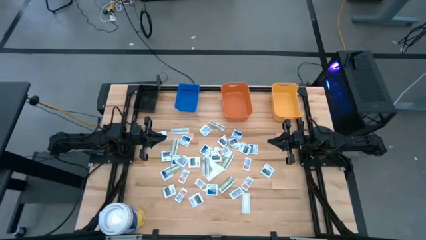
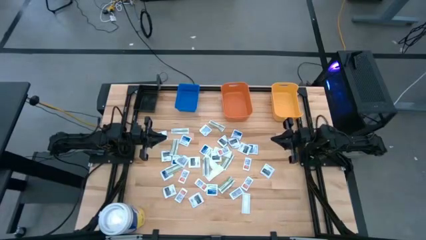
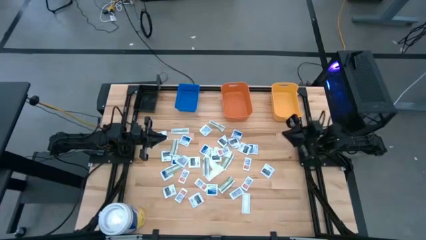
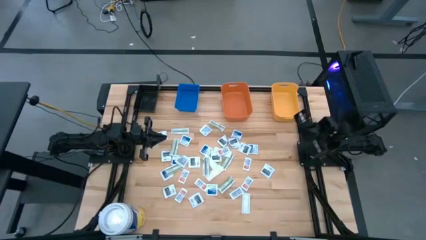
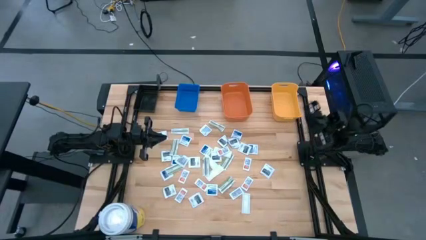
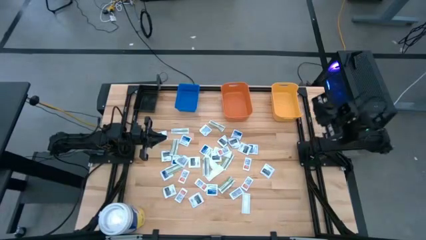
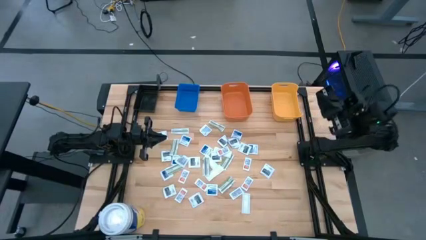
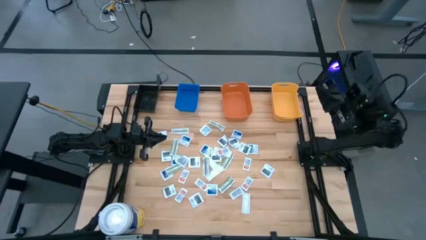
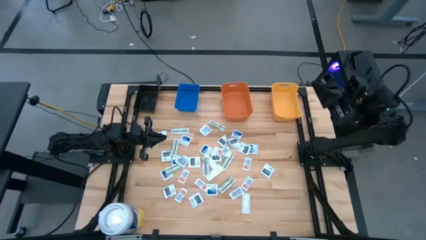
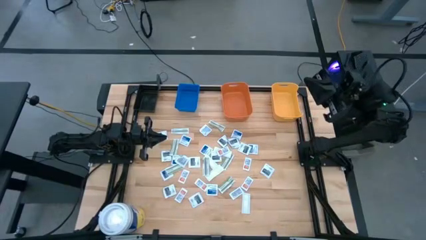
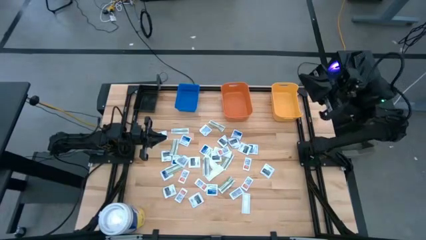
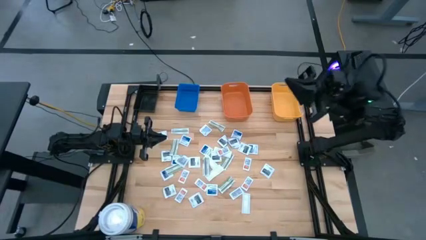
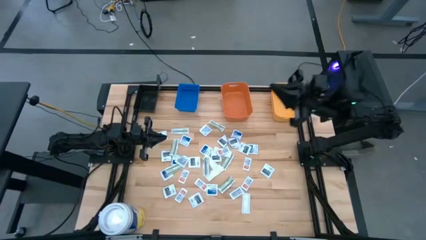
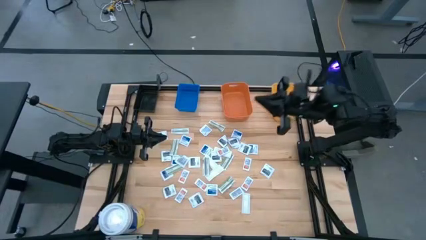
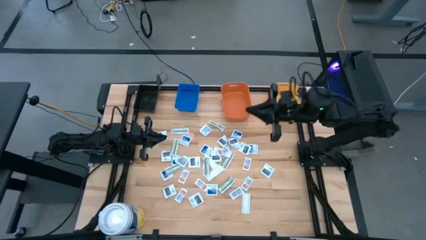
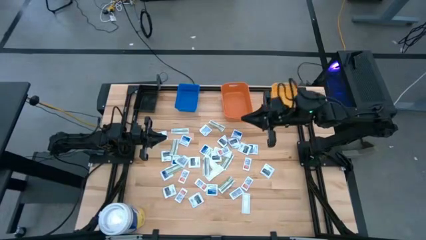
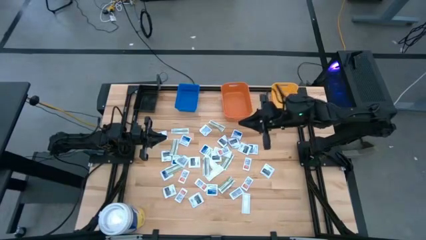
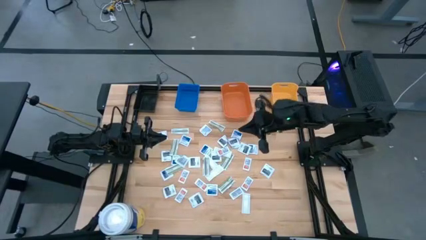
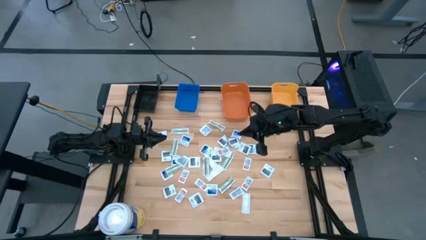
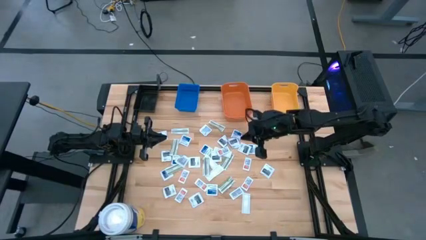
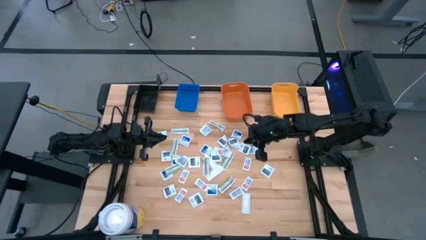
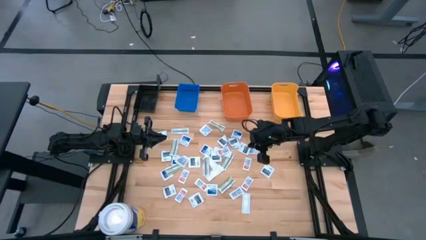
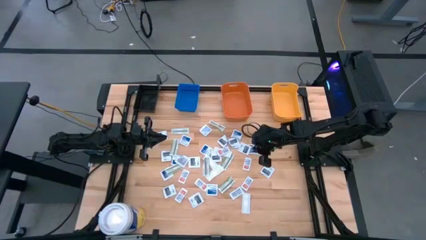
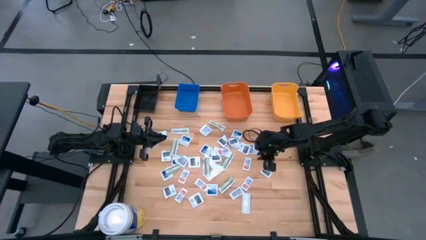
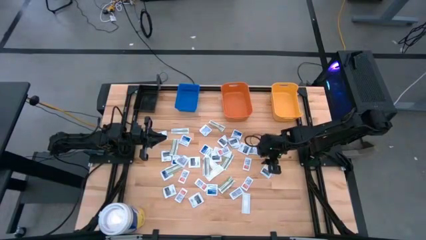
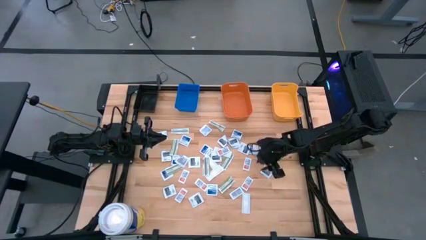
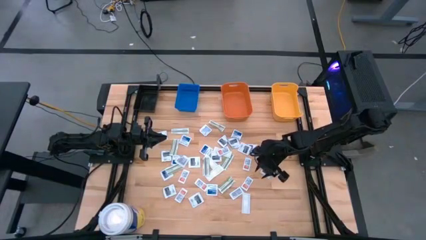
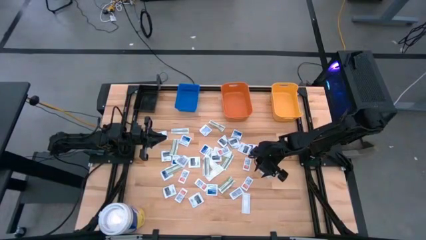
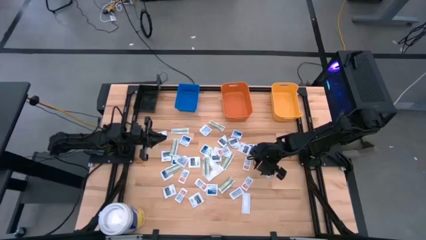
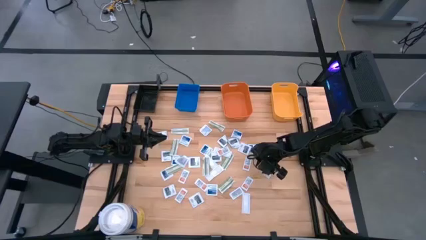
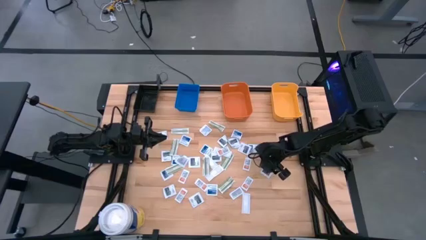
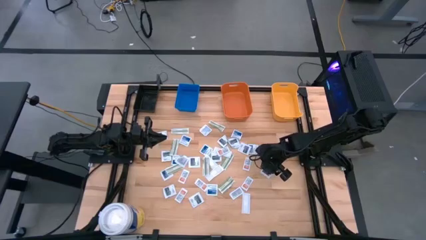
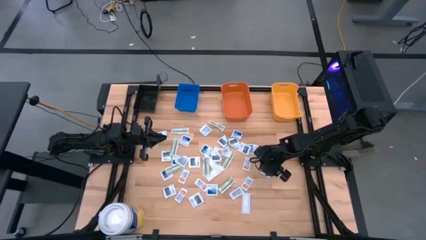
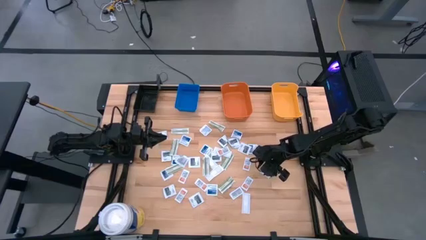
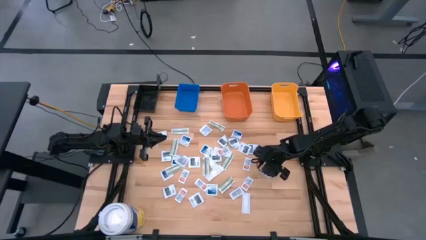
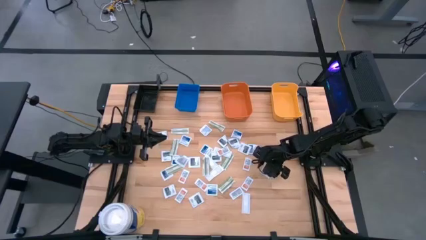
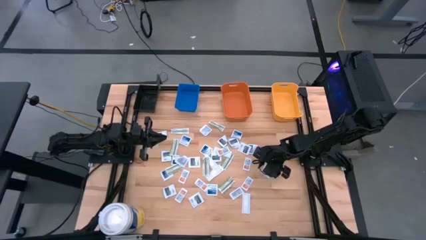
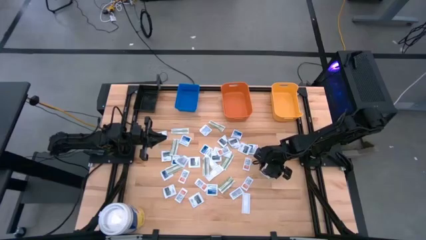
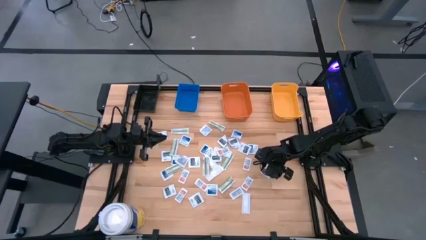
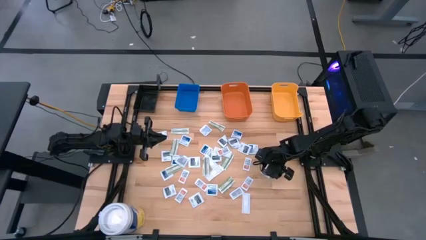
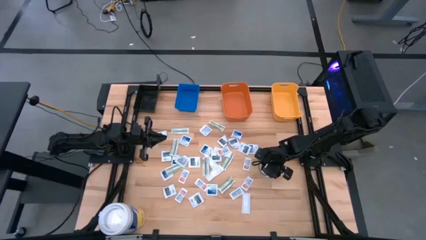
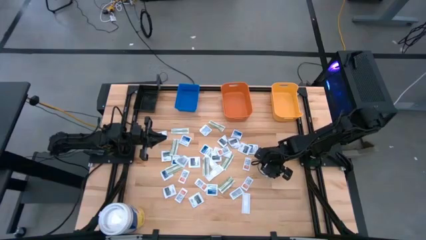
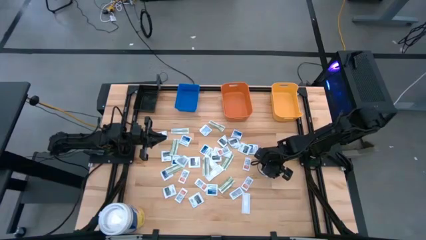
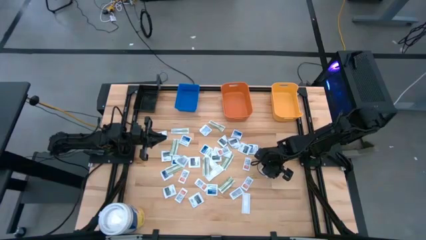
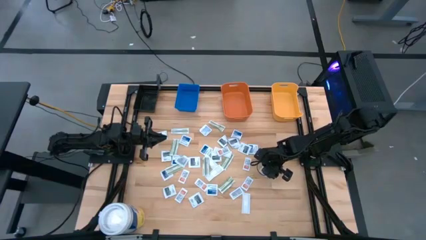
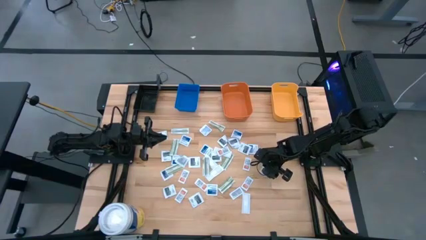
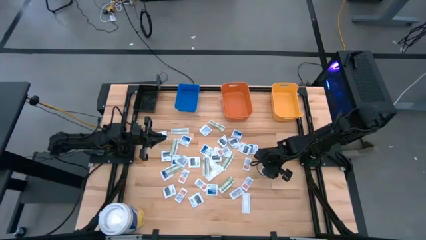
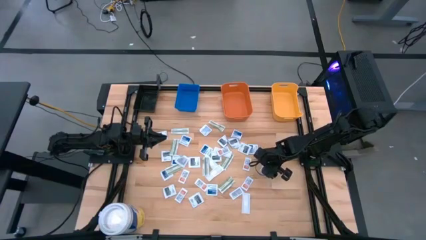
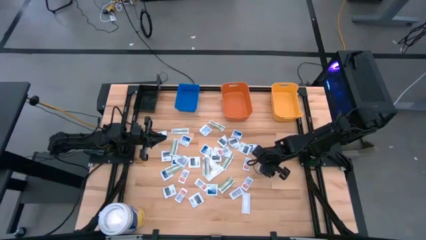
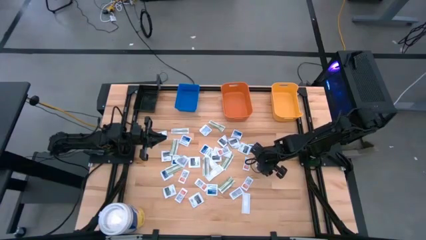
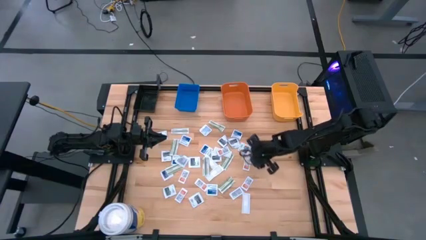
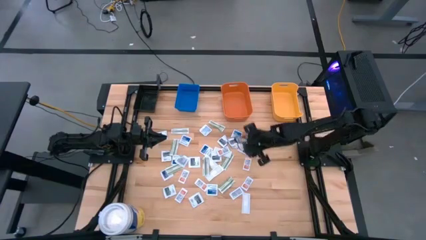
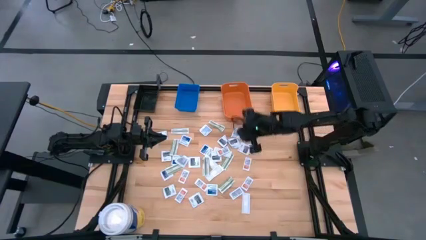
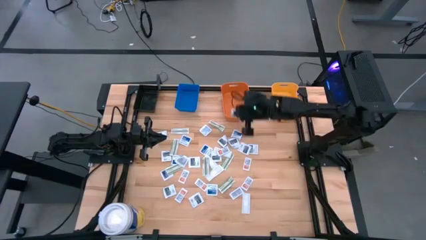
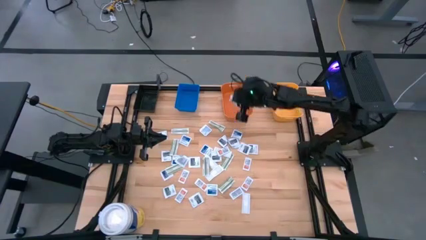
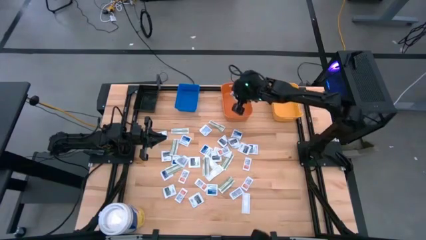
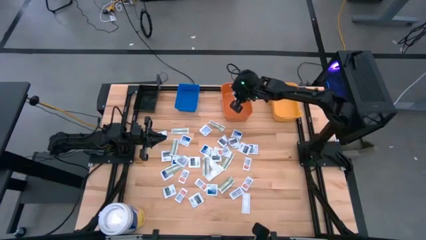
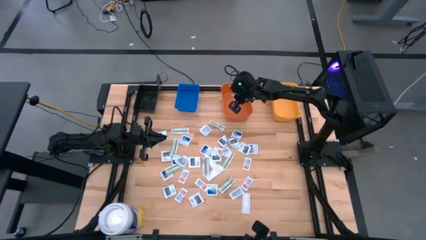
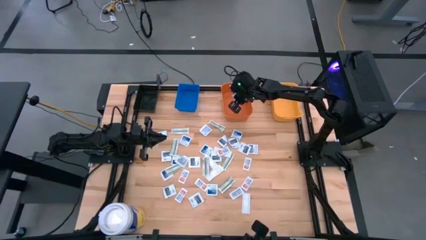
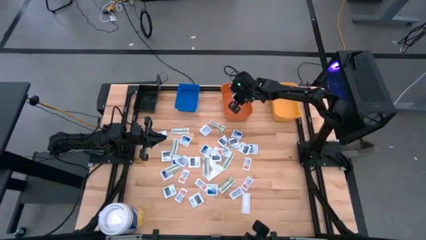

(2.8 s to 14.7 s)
Task: Pick & Place First Aid Supplies
Put the towelette pack into the orange bin
